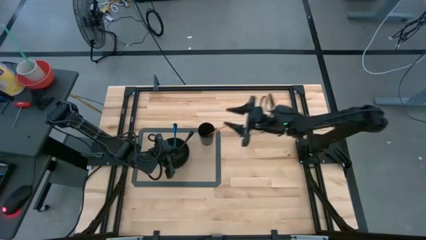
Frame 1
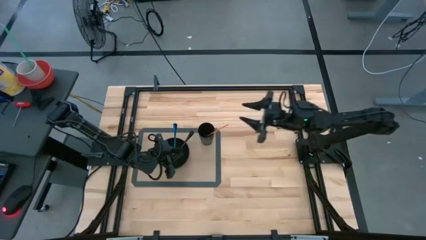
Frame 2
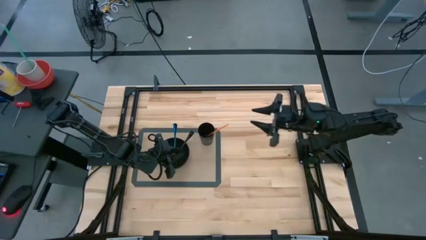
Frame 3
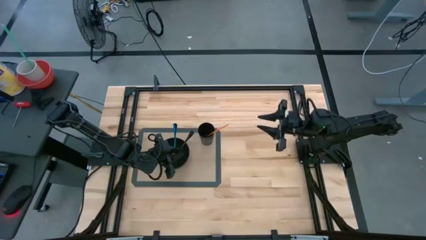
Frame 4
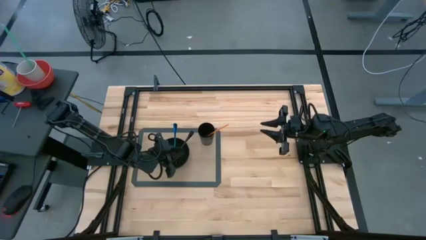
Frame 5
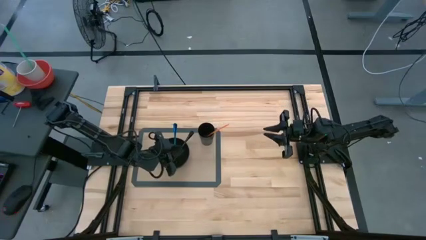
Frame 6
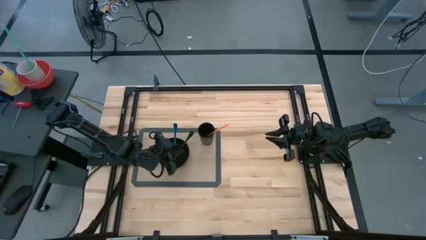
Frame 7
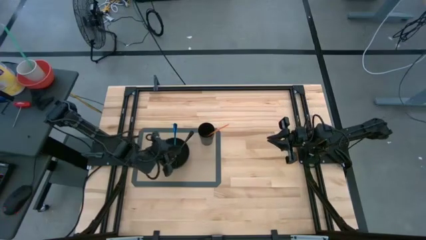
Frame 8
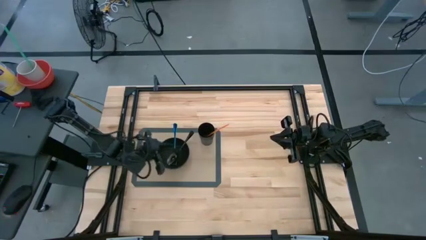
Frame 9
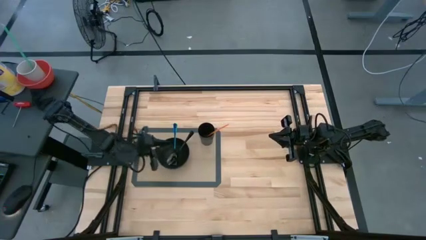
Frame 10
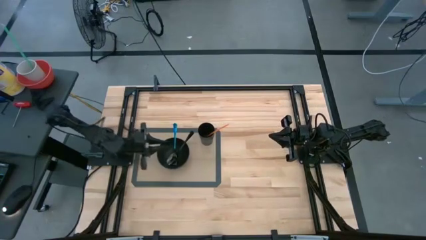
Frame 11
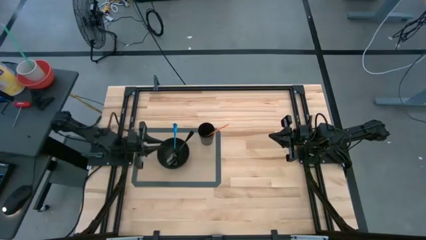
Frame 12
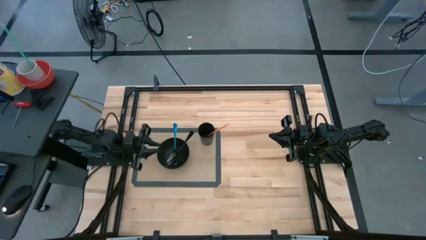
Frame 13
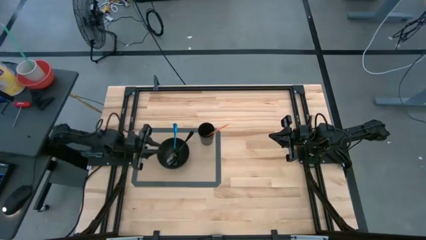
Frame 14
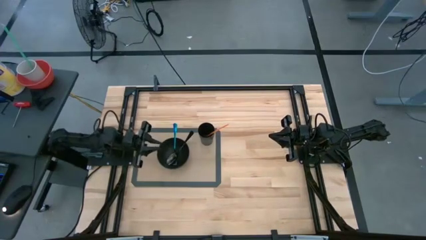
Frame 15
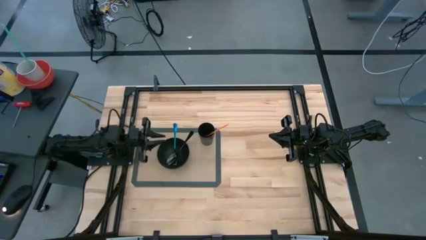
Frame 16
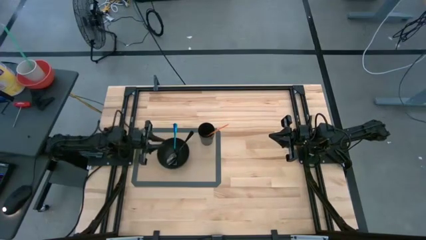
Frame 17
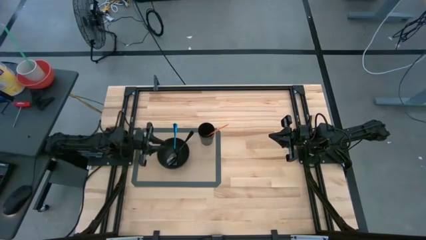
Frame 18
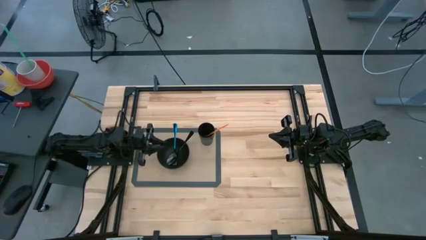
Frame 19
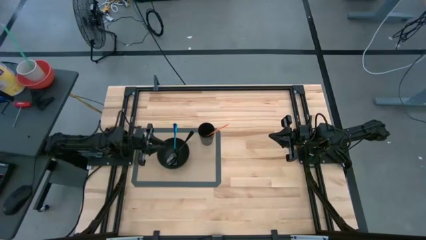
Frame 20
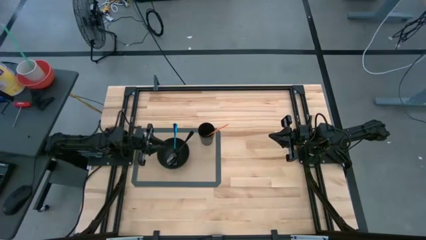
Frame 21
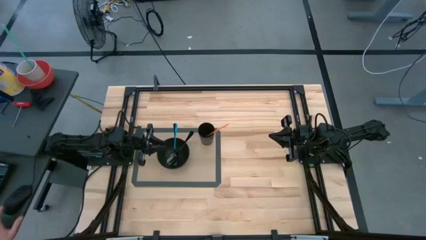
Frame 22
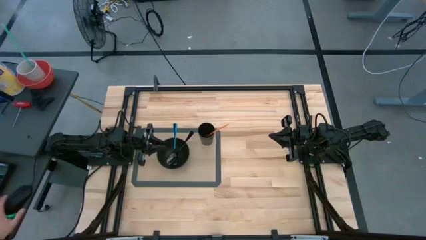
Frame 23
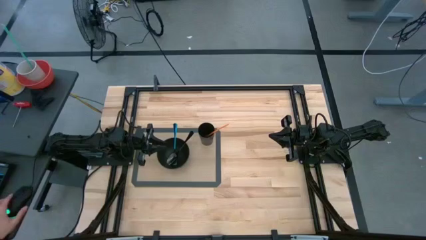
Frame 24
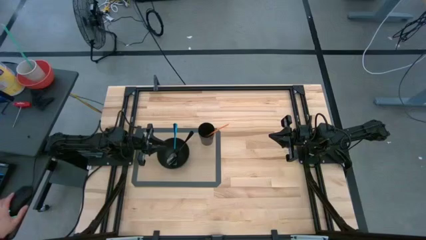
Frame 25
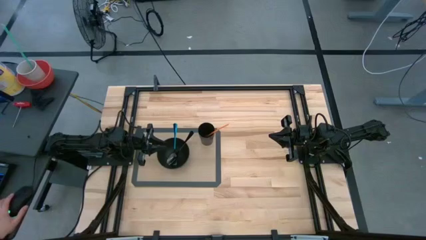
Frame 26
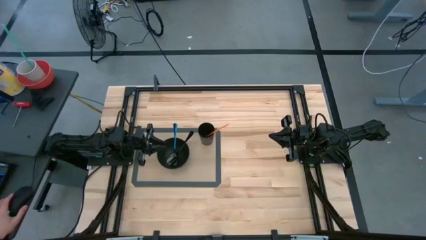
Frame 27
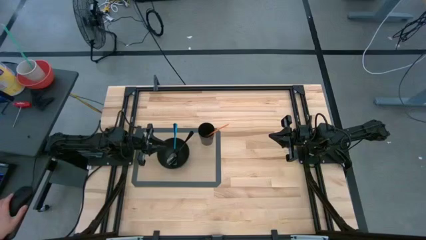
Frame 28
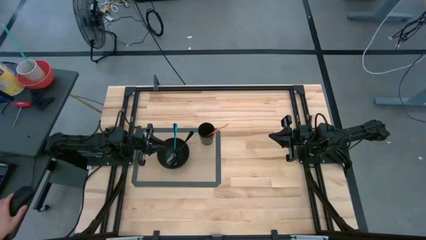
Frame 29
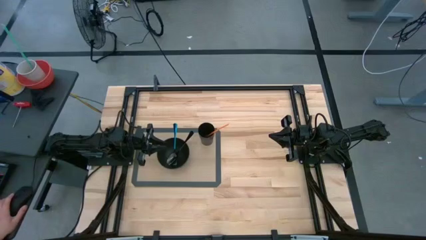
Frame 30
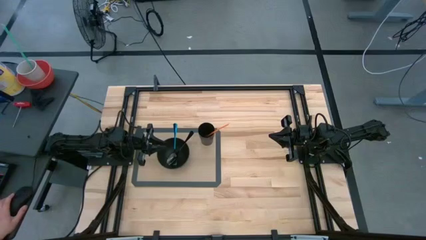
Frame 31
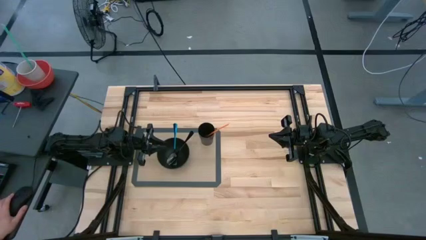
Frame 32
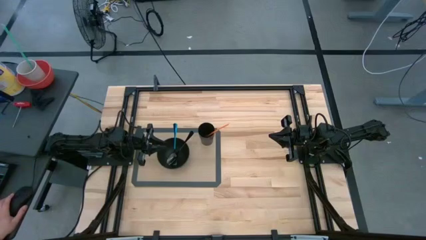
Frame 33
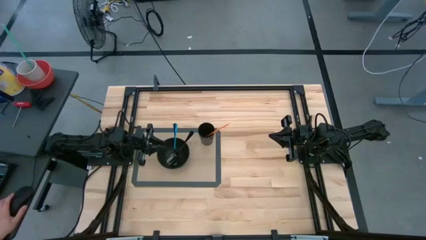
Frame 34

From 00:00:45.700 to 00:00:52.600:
Task: Pick & Place Utensil
Return to Home Position

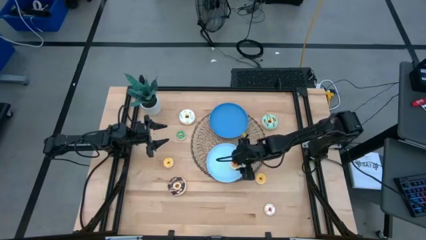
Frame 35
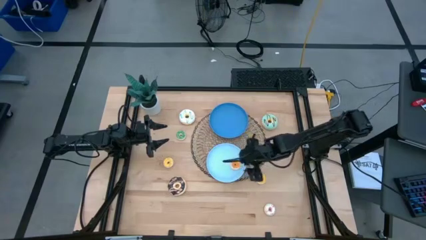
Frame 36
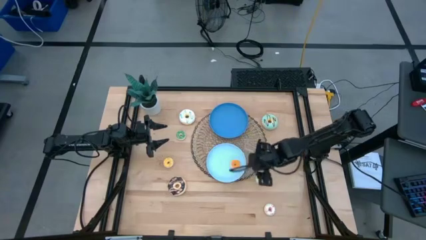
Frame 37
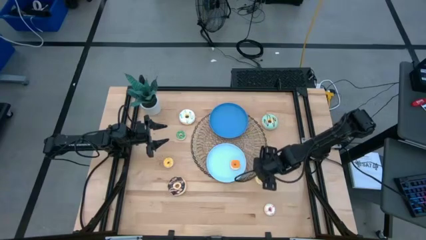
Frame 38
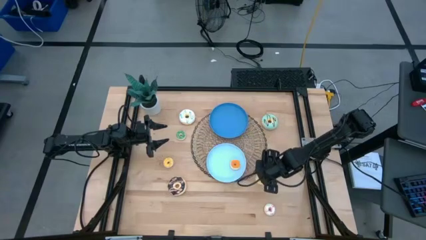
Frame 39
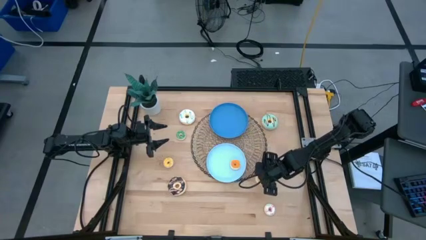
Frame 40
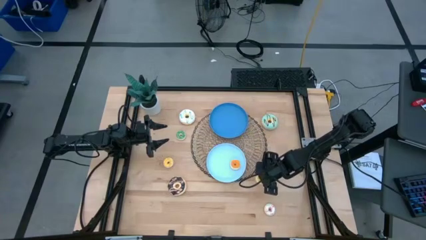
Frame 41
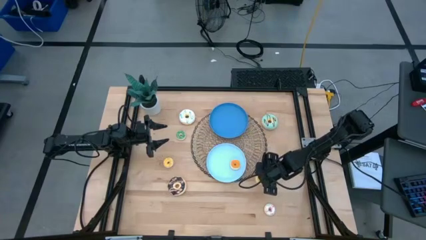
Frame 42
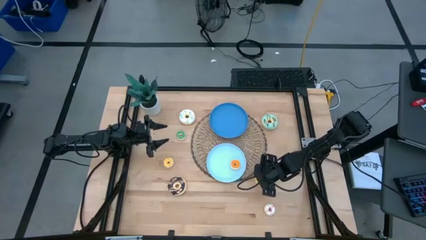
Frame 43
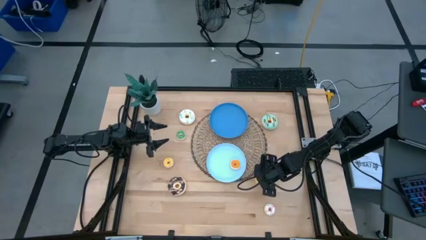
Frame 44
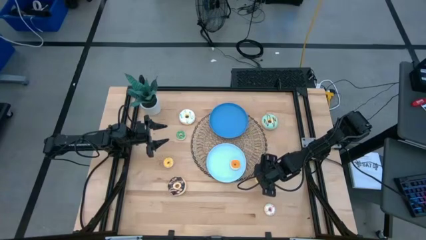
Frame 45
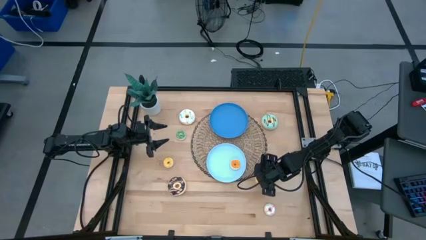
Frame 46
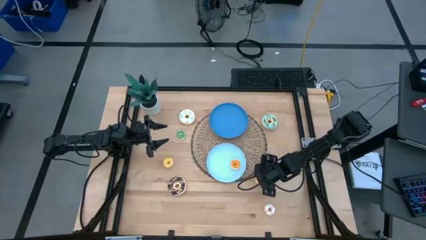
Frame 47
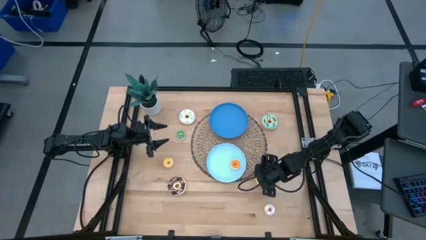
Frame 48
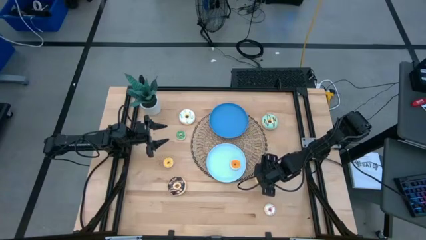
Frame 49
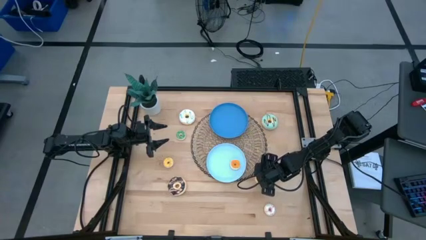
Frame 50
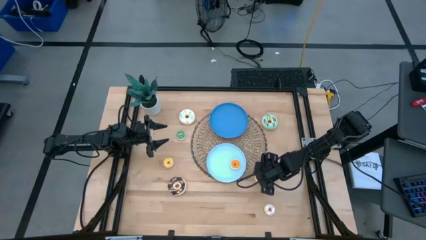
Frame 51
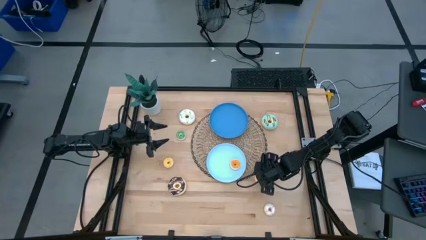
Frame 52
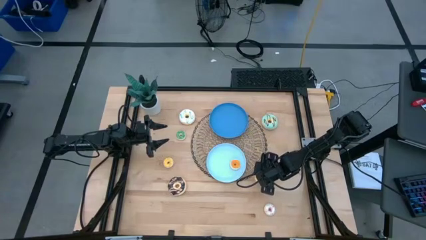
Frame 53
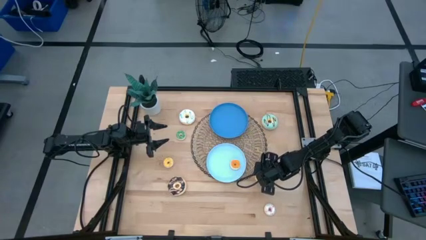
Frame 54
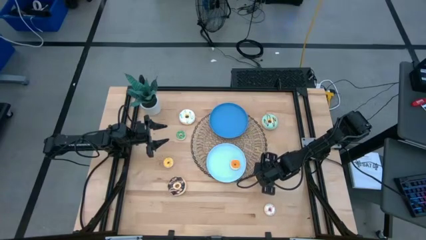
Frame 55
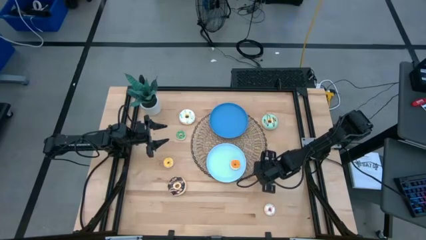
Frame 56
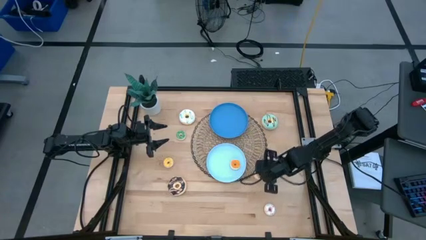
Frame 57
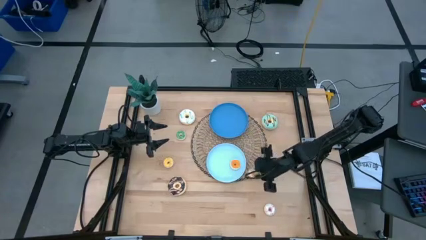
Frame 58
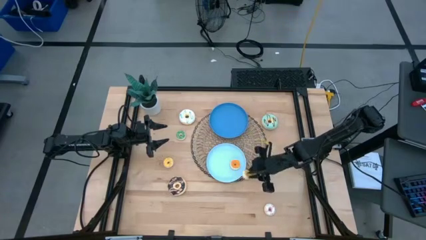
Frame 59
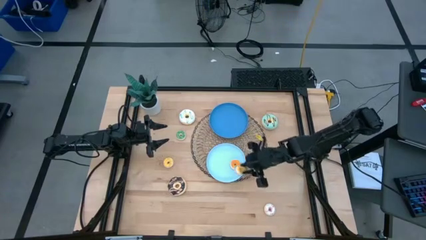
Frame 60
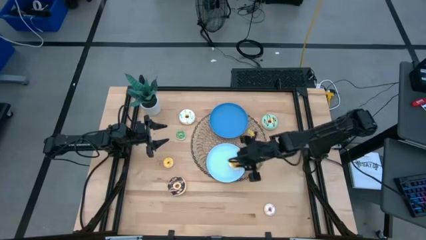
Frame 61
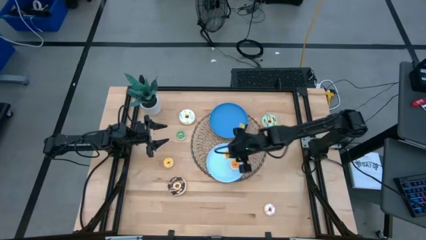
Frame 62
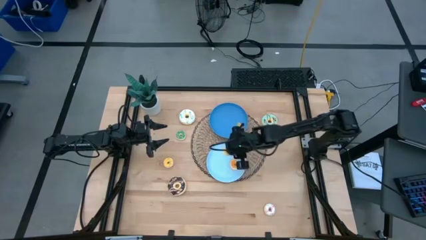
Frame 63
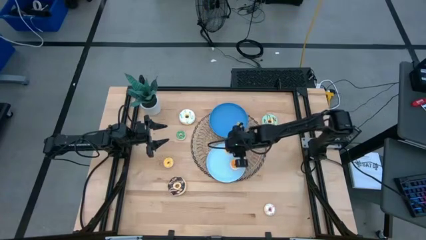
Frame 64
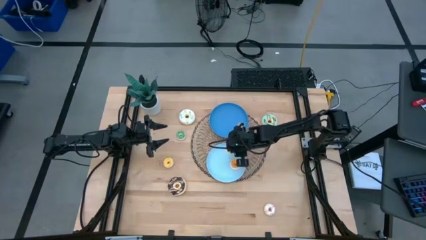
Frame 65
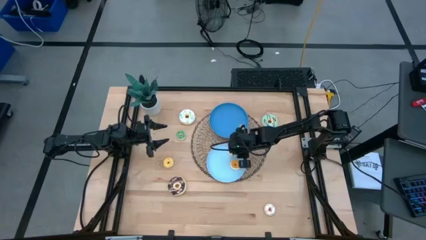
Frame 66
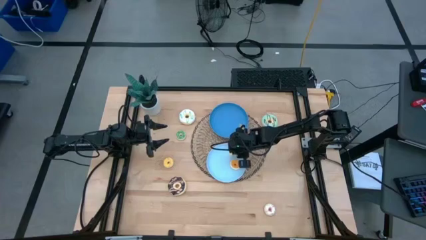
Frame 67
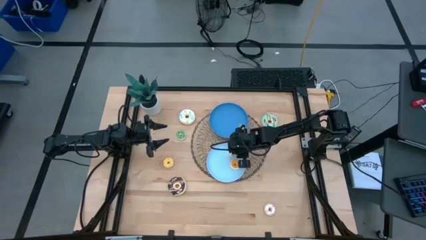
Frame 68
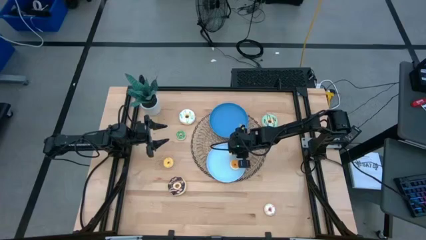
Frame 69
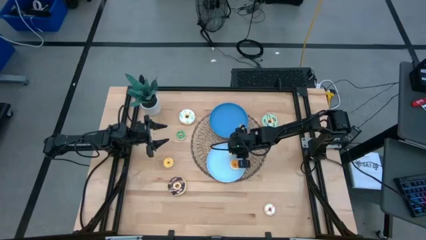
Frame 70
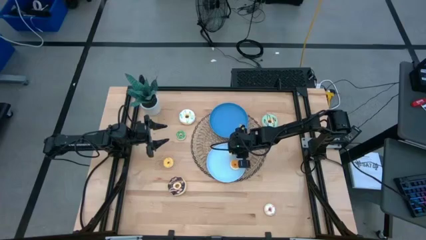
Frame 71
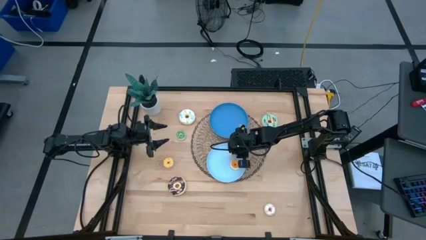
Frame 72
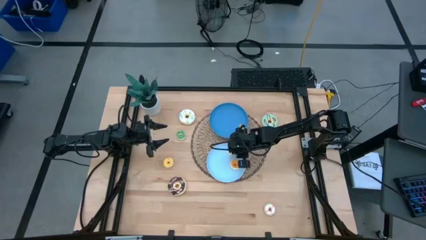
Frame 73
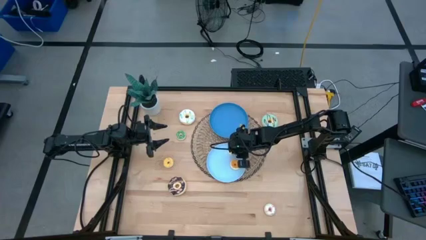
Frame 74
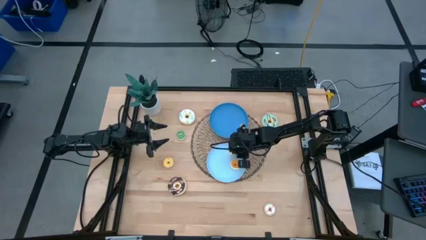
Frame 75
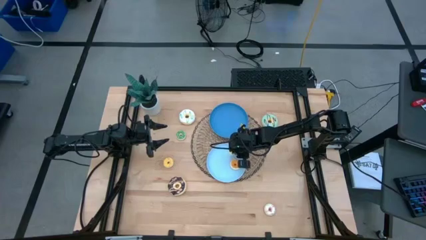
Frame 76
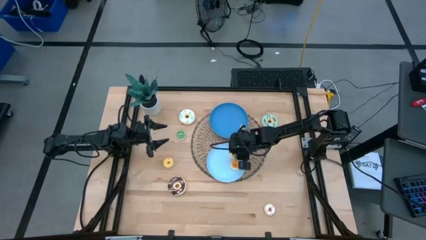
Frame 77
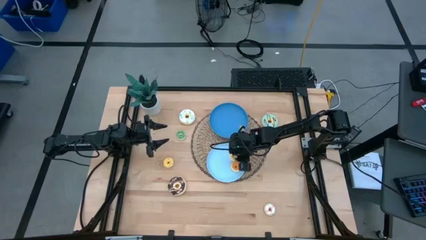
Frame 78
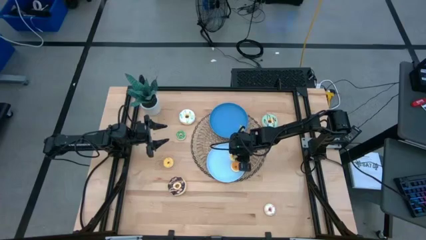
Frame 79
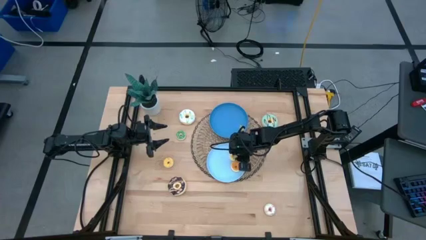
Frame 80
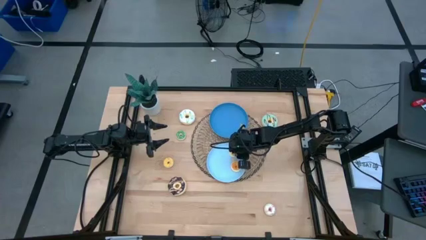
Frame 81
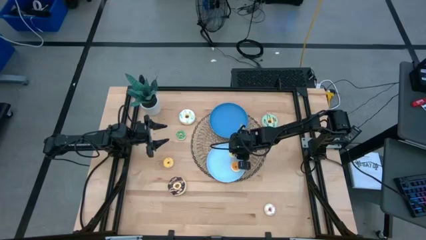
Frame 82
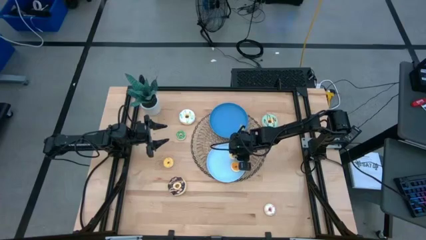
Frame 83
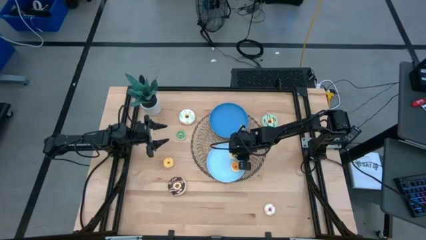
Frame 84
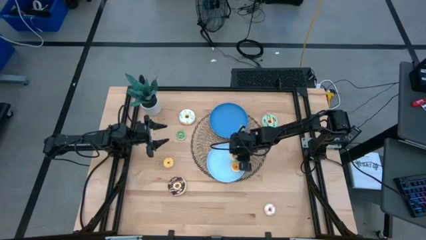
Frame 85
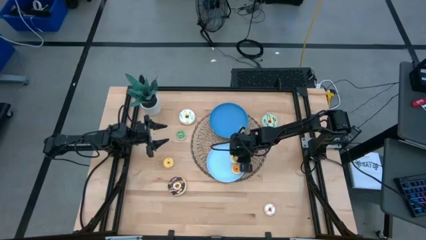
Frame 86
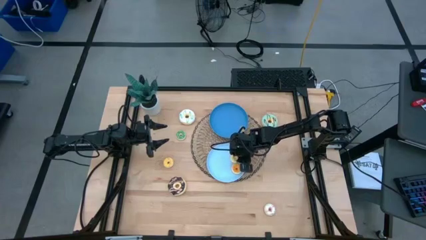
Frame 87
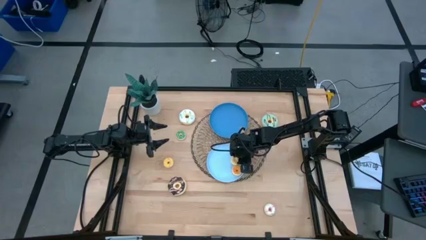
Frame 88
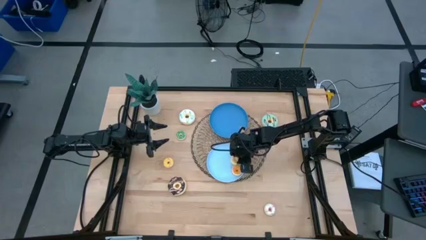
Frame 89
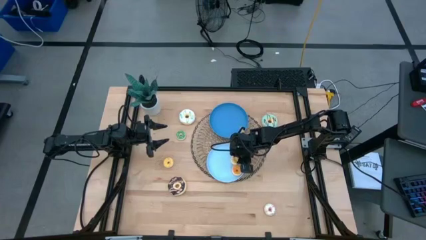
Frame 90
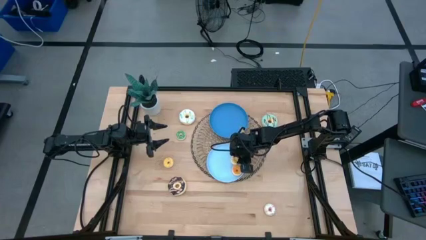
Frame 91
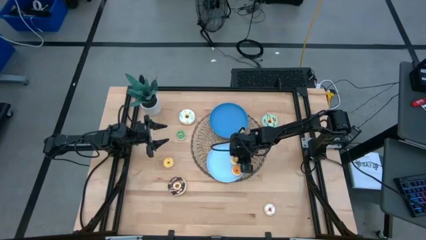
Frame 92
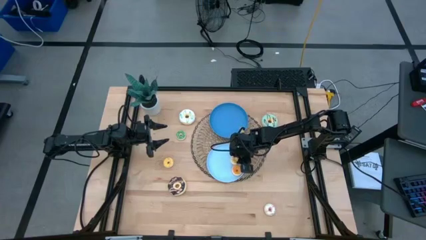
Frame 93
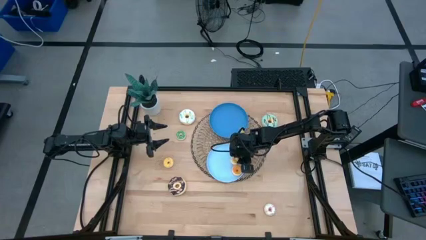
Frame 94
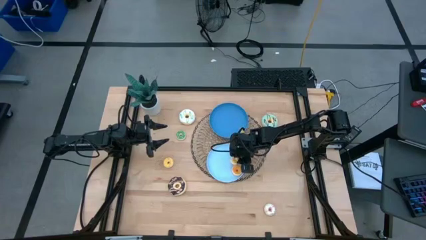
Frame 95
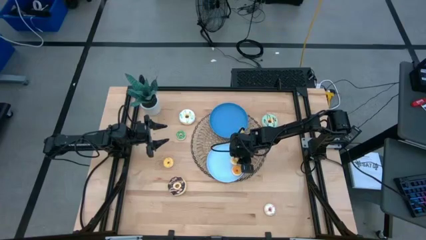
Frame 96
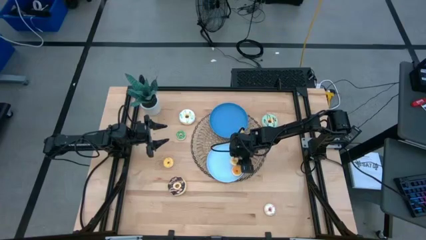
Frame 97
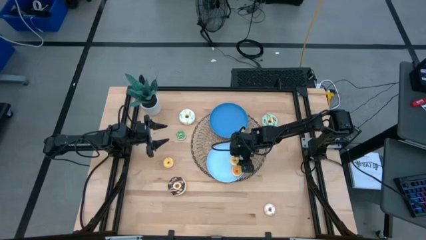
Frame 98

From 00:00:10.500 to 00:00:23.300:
Task: Pick & Place donuts
Put the small yellow donut on the light blue plate
